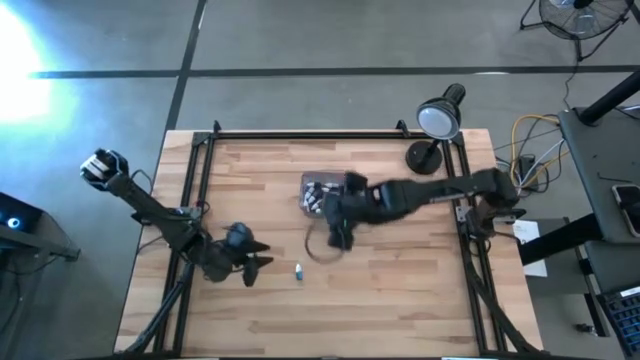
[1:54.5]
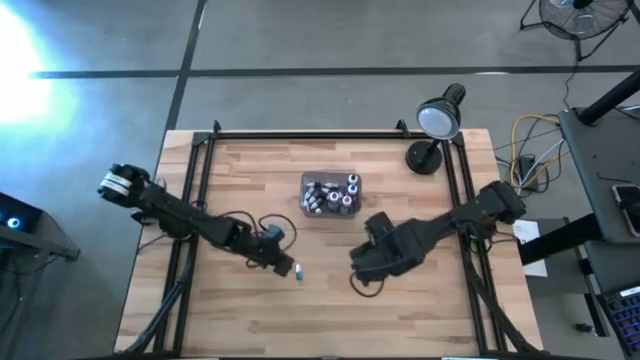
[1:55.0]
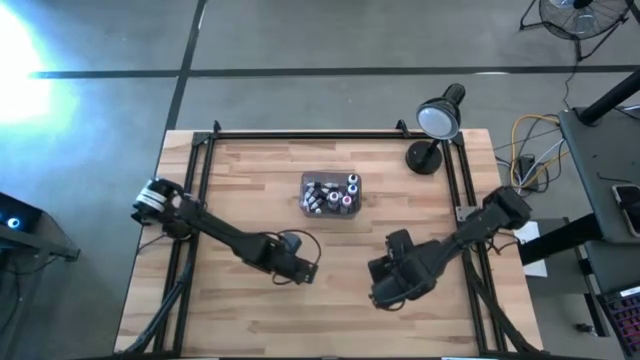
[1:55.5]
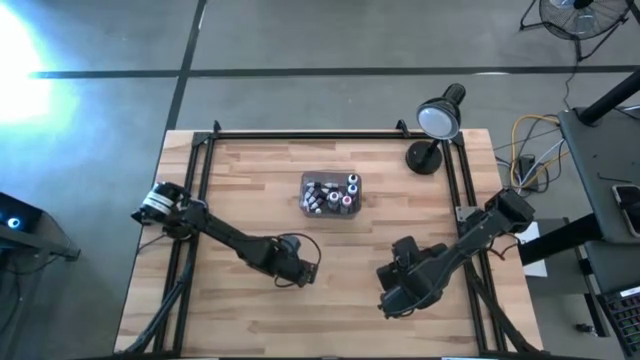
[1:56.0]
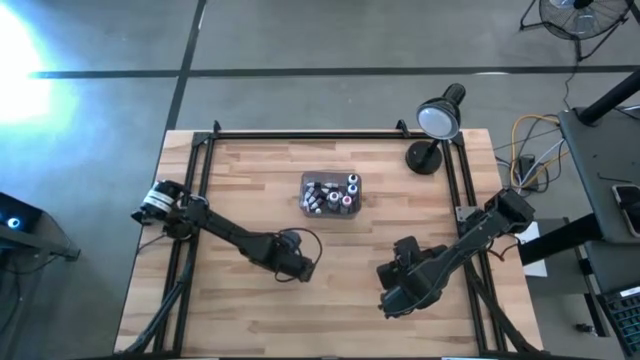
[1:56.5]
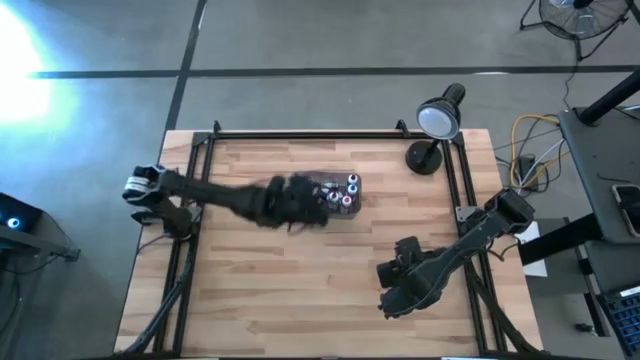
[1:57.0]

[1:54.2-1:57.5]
Task: Pick & Place food coloring
Put the small blue food coloring bottle into the bin

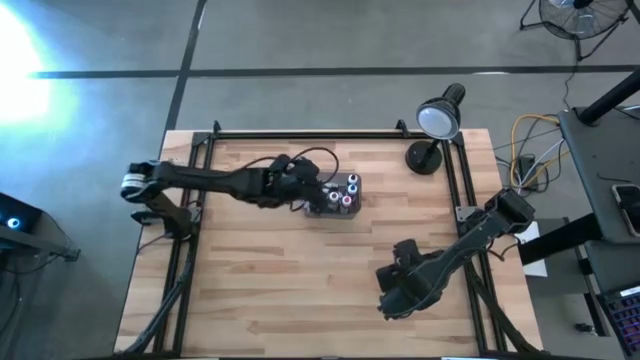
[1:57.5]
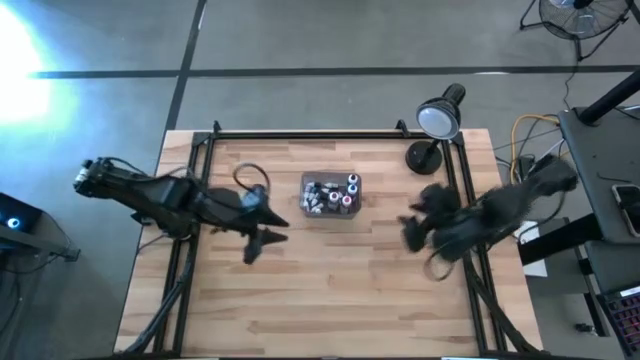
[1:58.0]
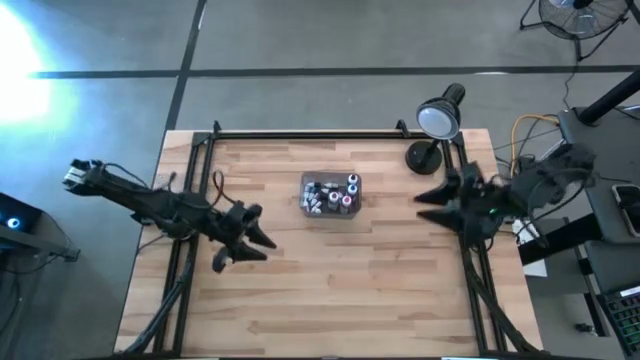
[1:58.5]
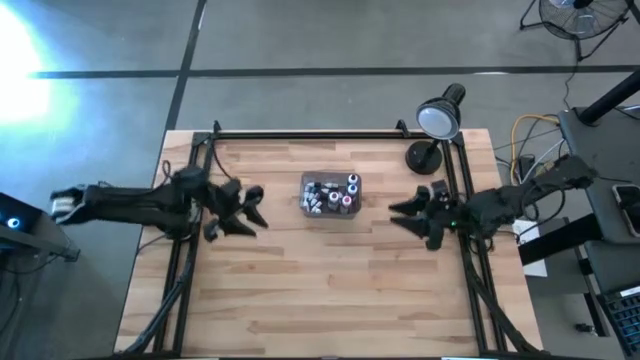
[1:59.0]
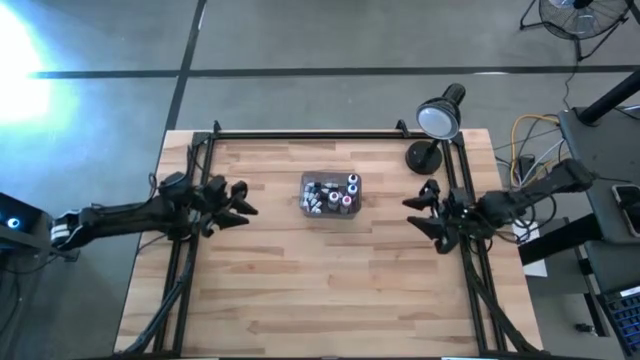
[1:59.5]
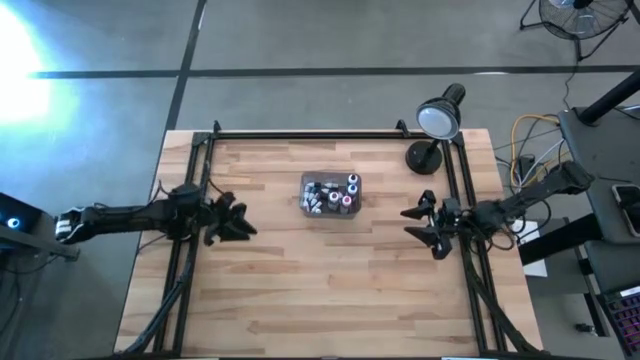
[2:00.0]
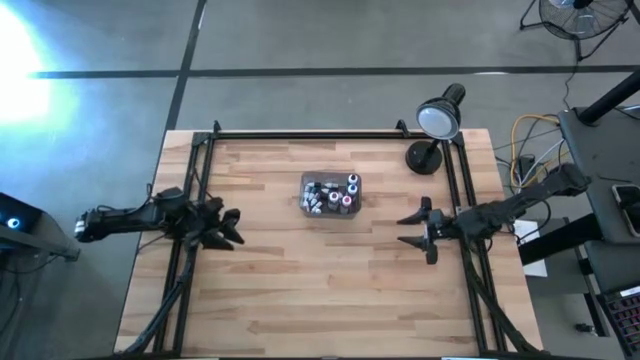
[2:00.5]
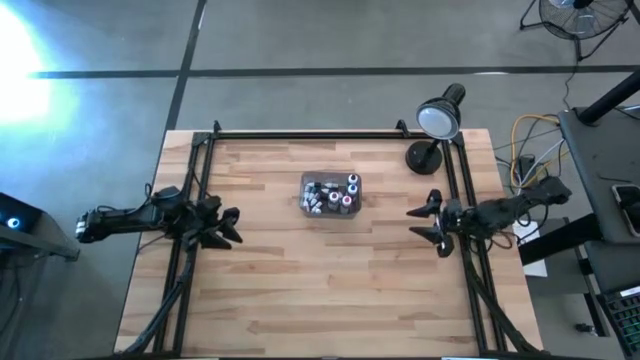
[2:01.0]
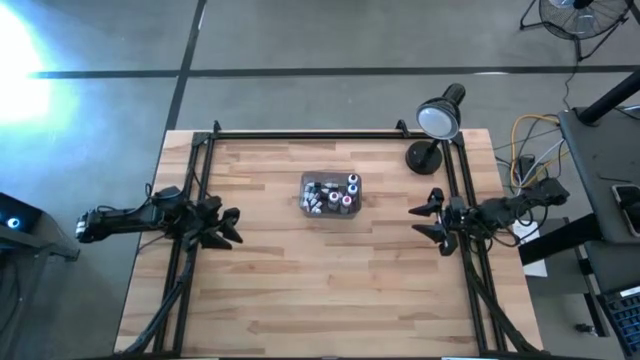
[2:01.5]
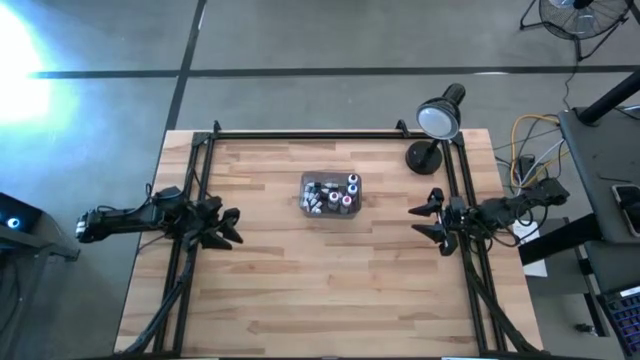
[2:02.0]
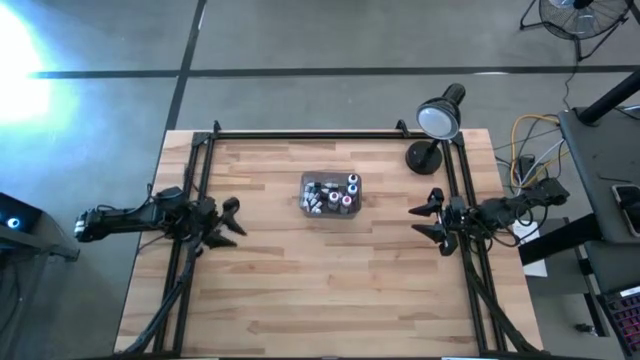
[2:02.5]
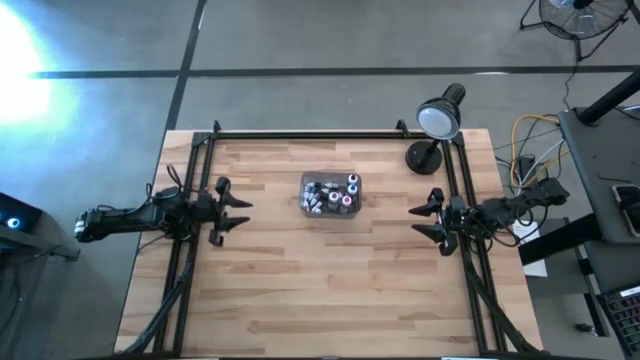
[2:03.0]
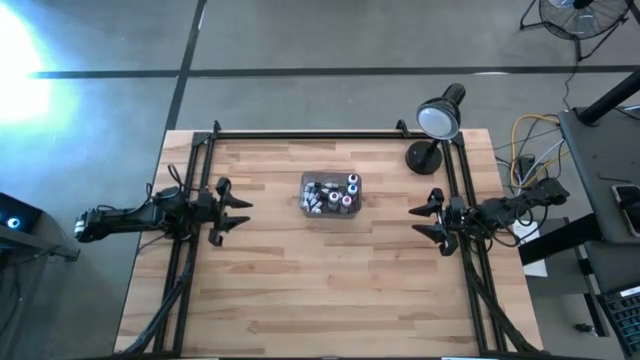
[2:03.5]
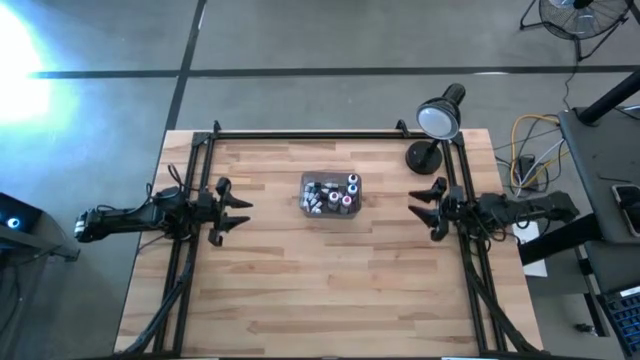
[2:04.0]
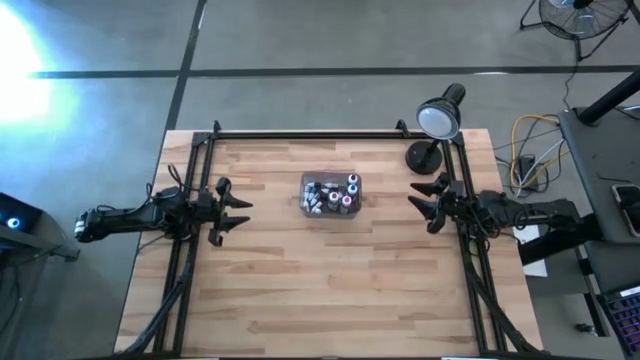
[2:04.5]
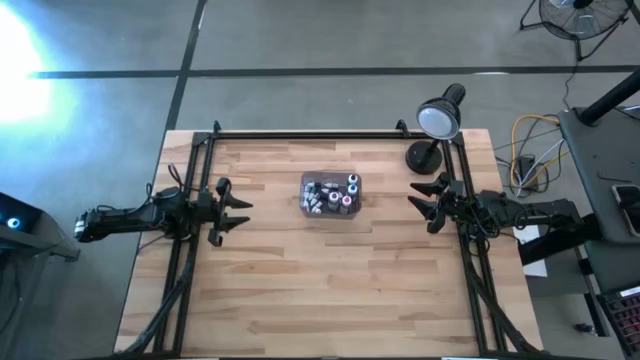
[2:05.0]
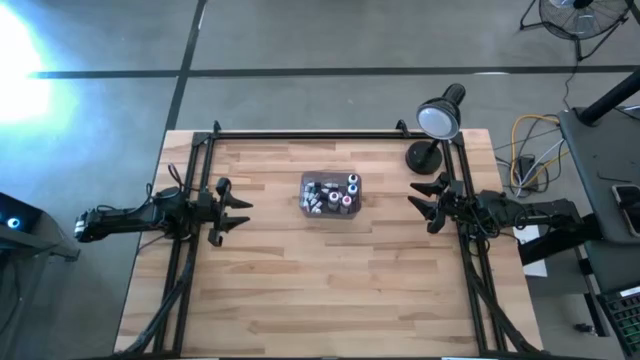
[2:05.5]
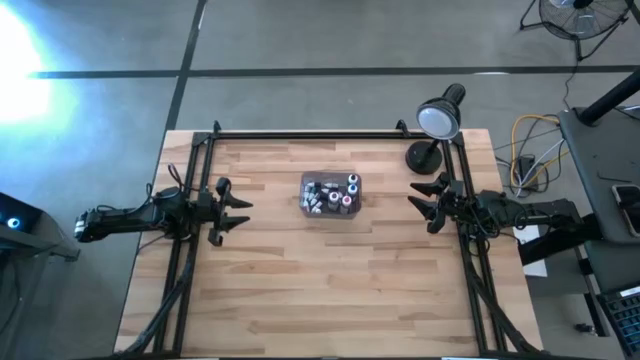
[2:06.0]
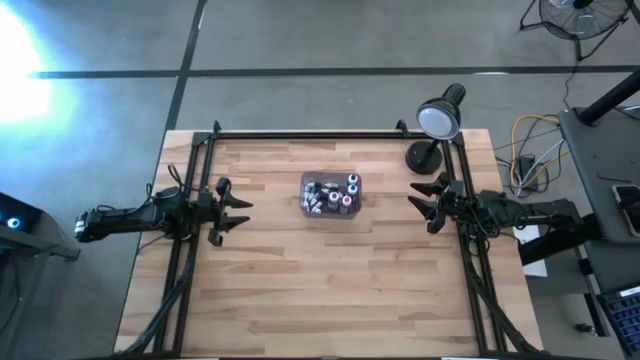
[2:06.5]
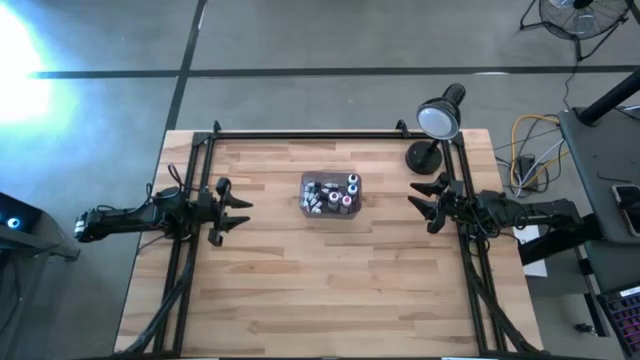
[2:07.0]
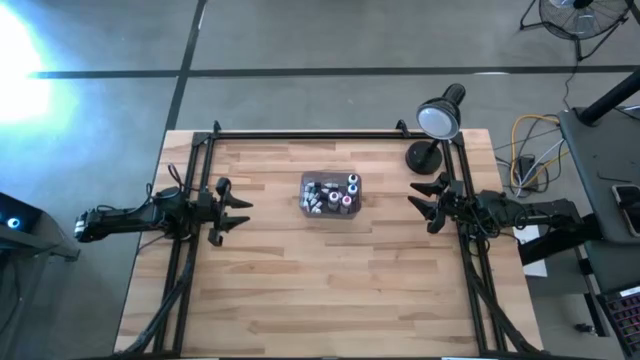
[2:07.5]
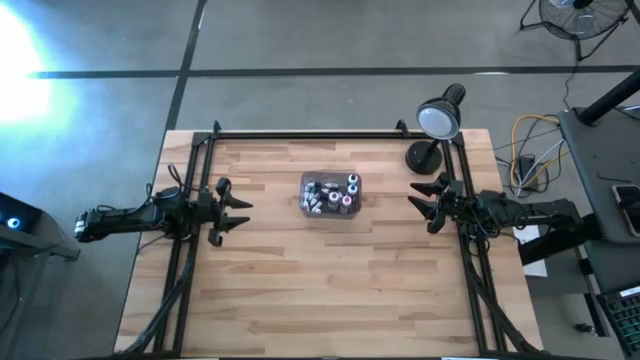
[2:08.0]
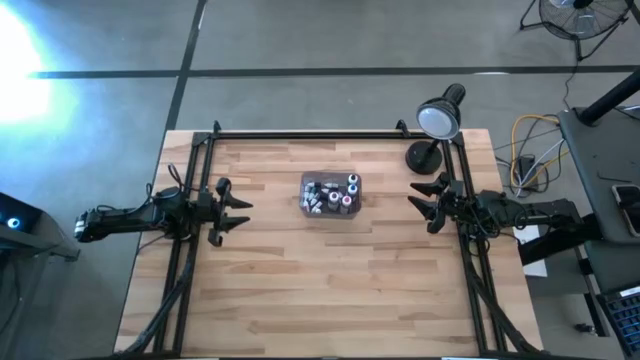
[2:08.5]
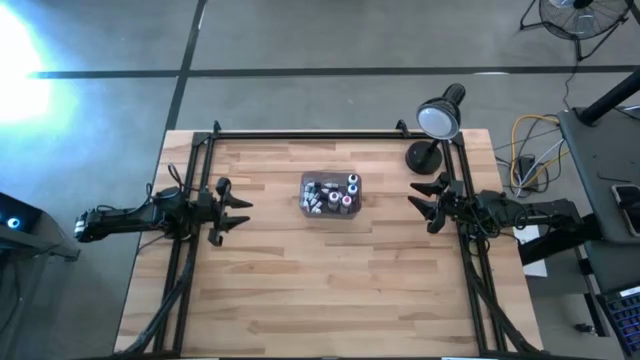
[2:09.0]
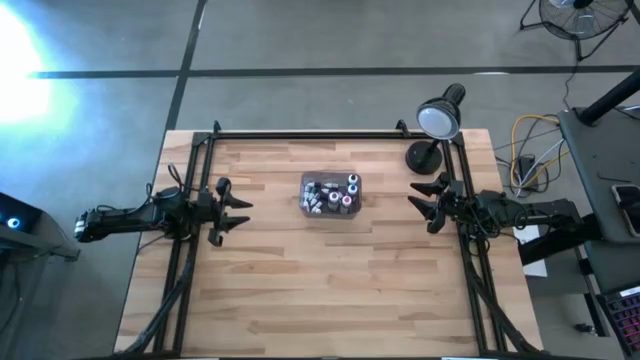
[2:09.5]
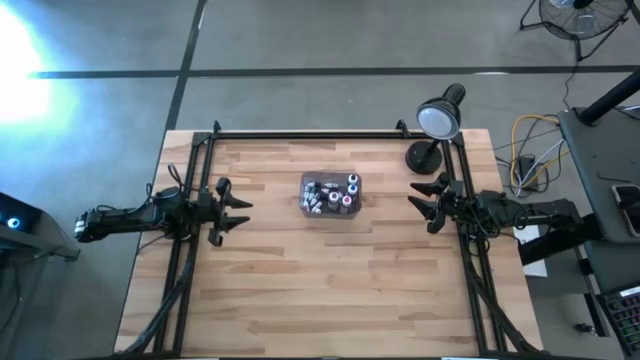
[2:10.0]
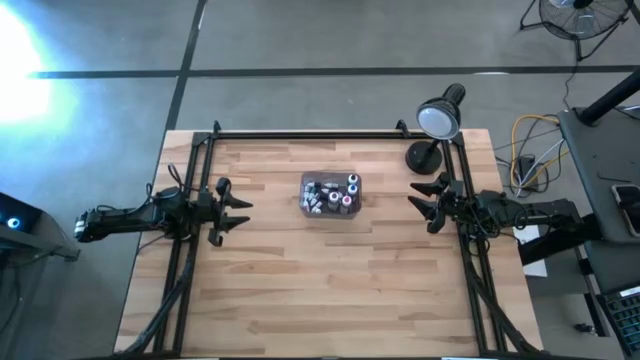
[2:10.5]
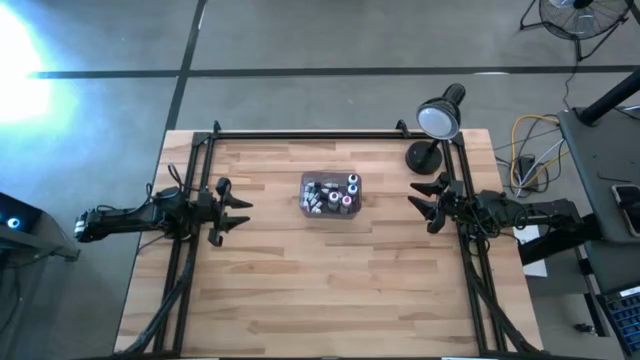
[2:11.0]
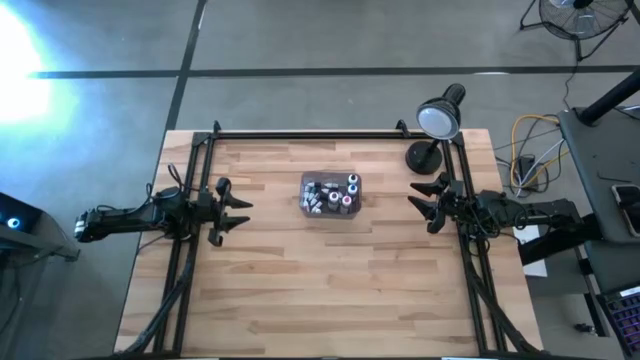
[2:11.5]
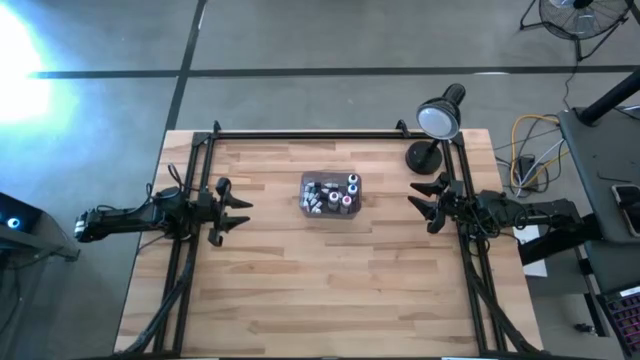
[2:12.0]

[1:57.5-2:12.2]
Return to Home Position
